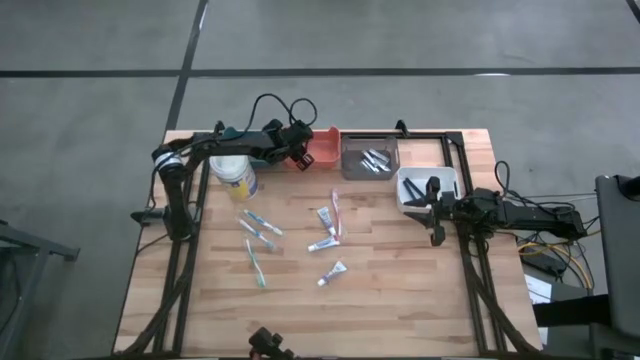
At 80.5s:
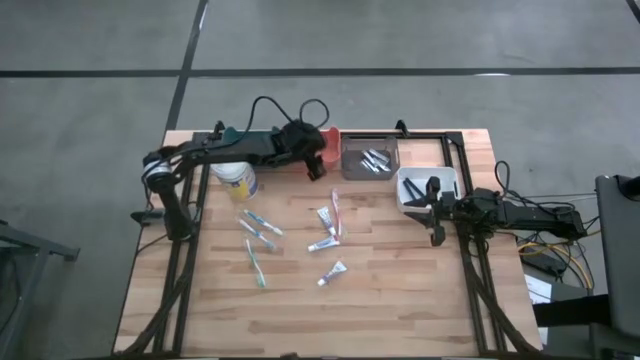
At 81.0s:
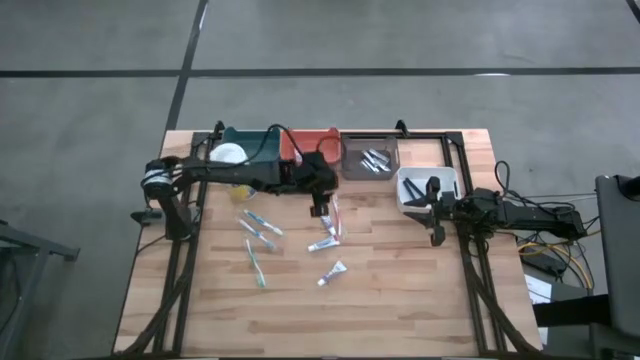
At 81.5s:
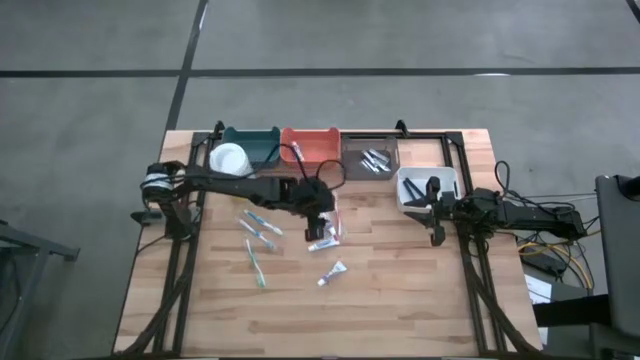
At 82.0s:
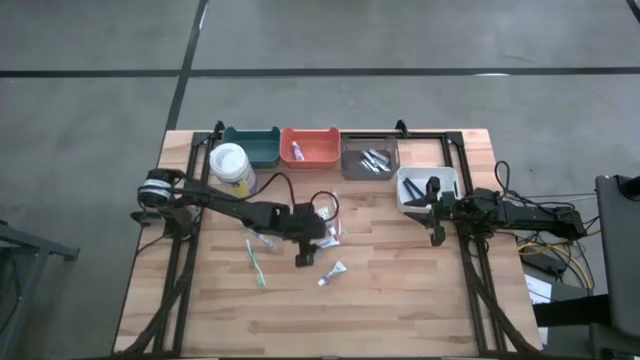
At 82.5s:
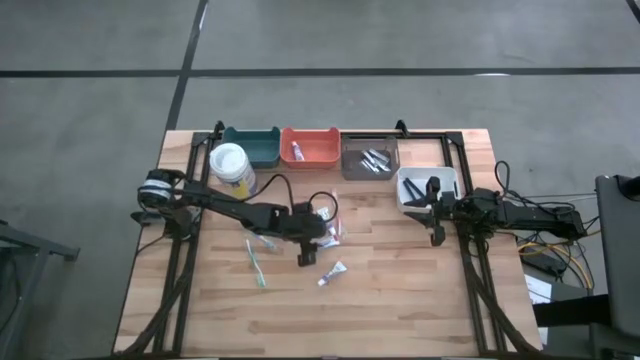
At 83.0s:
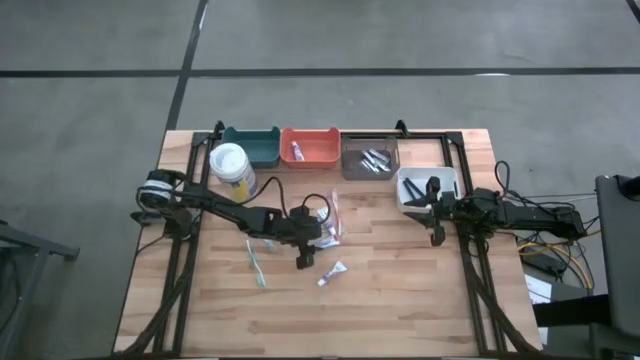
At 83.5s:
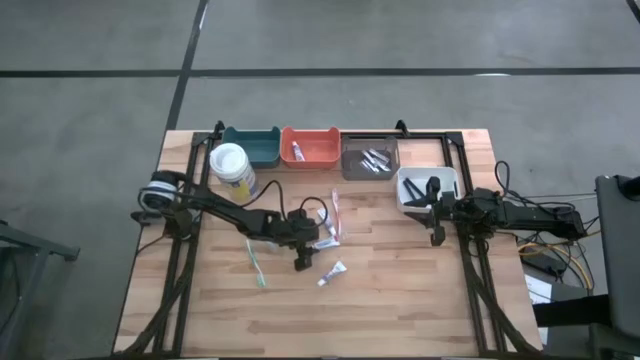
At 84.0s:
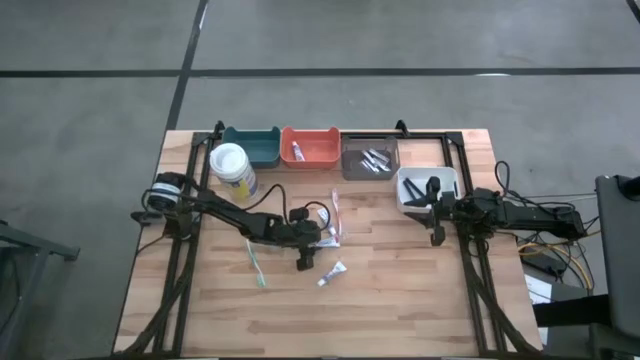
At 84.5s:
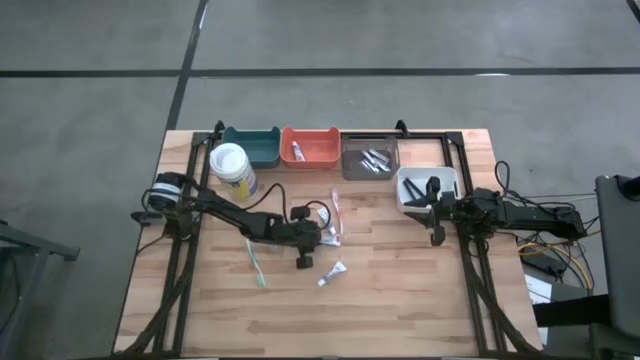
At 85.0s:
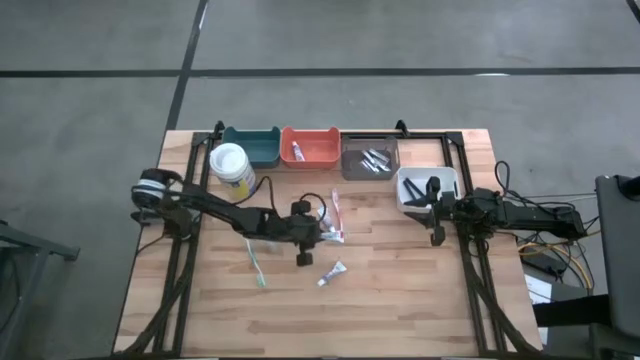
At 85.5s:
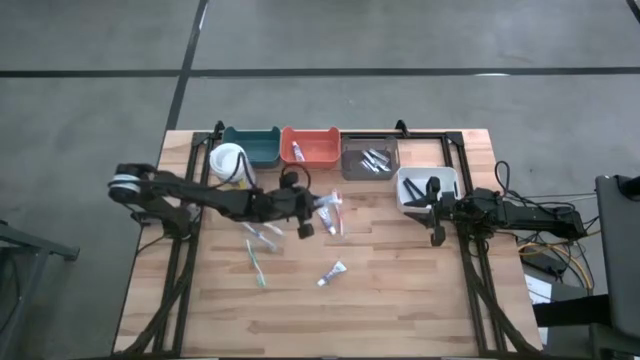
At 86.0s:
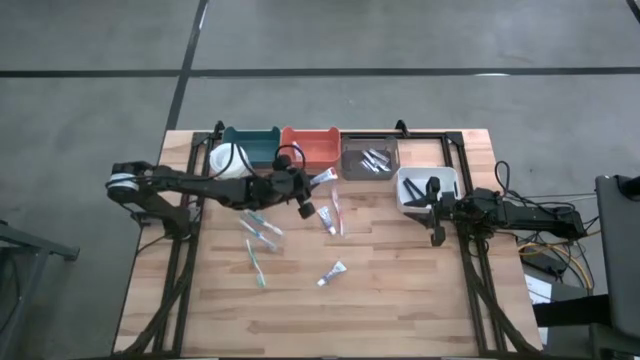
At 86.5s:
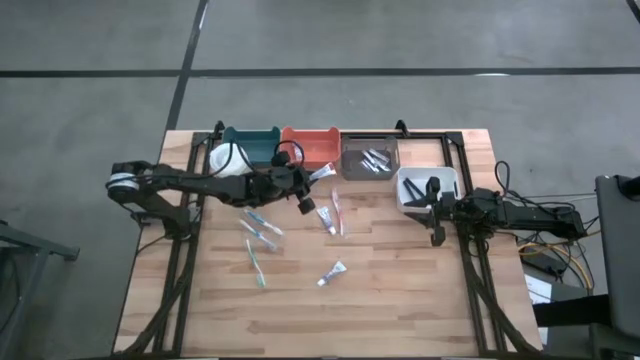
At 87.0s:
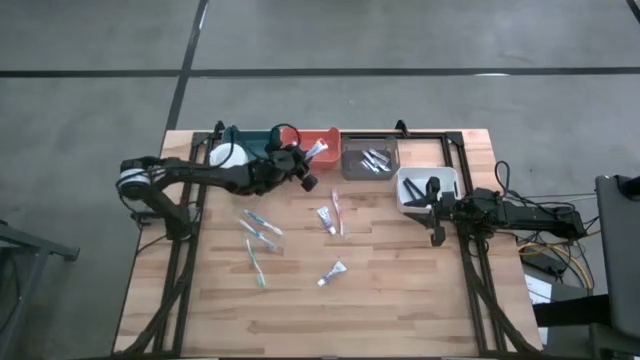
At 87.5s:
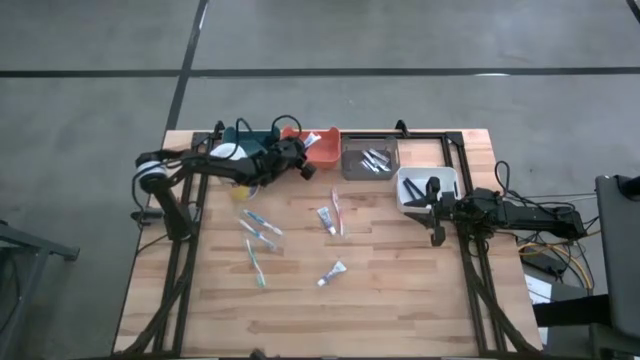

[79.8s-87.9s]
Task: Pick & Place Travel size toiletries
Put the middle toothpaste into the orange bin

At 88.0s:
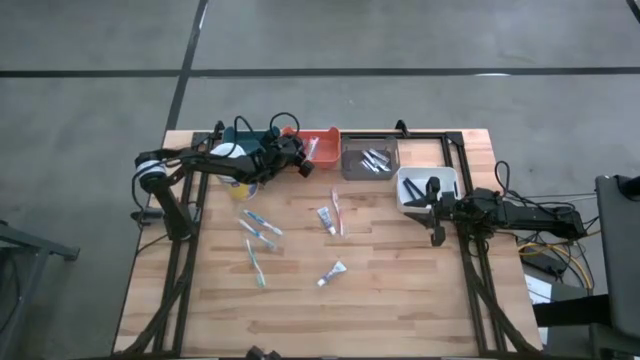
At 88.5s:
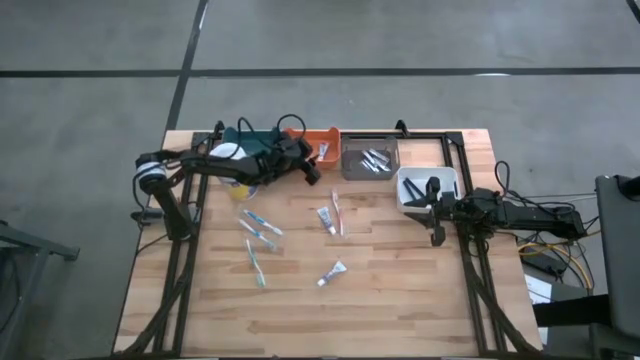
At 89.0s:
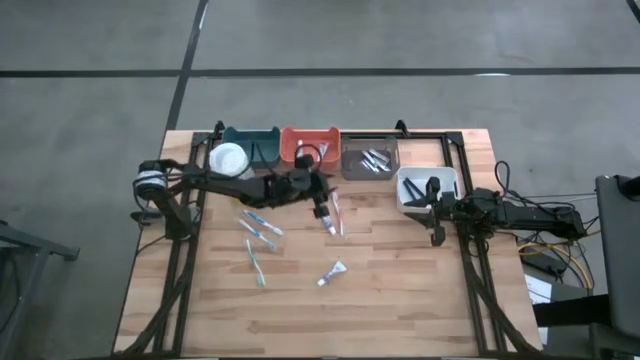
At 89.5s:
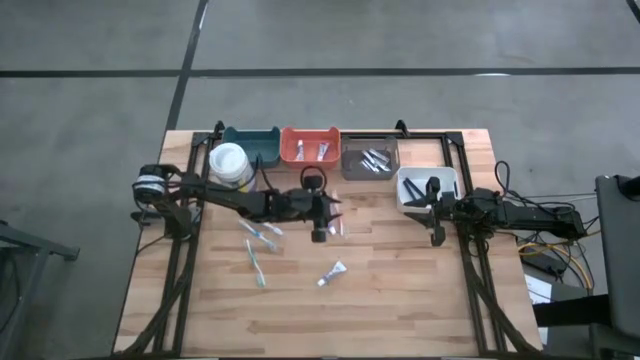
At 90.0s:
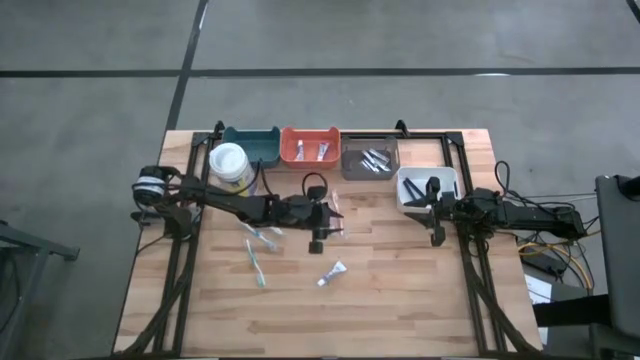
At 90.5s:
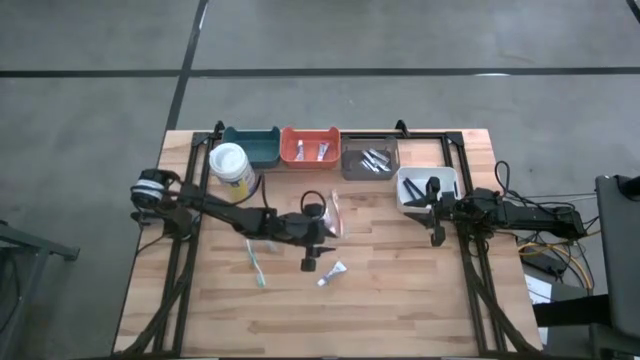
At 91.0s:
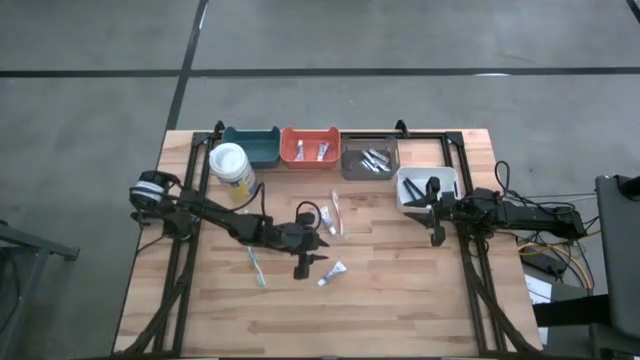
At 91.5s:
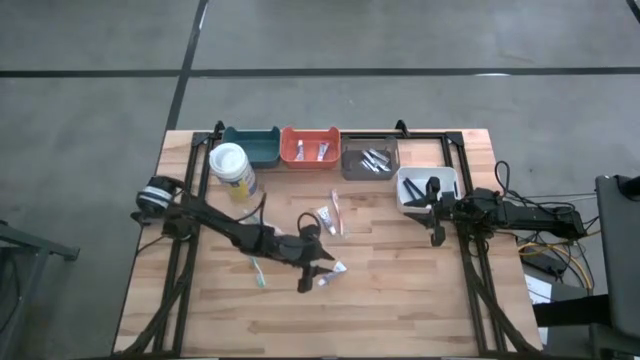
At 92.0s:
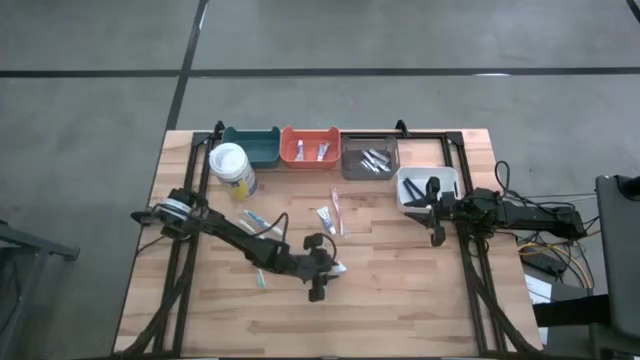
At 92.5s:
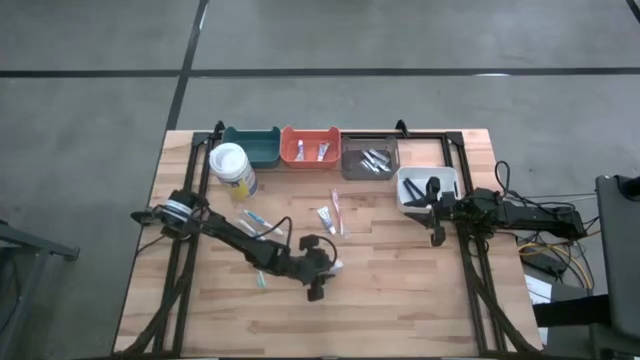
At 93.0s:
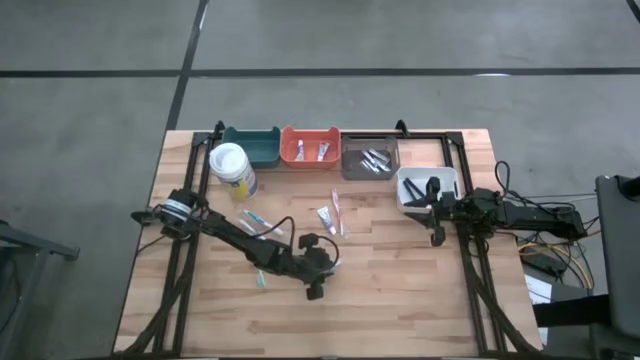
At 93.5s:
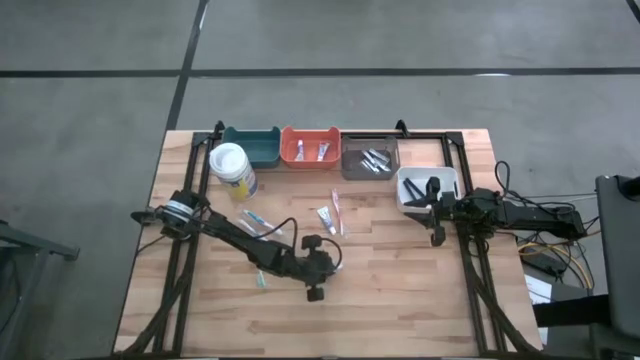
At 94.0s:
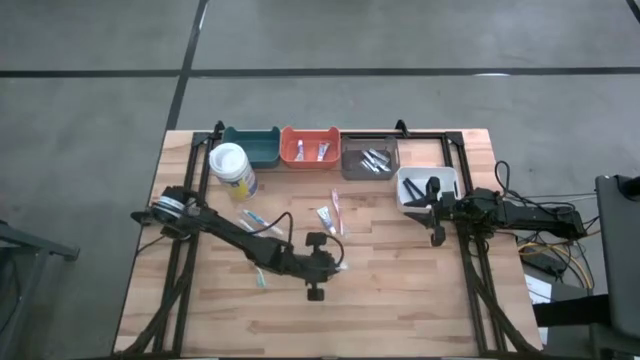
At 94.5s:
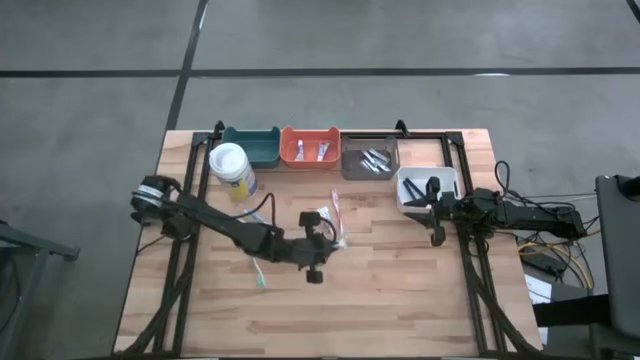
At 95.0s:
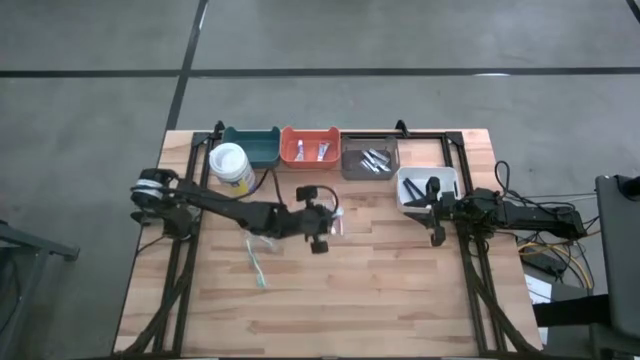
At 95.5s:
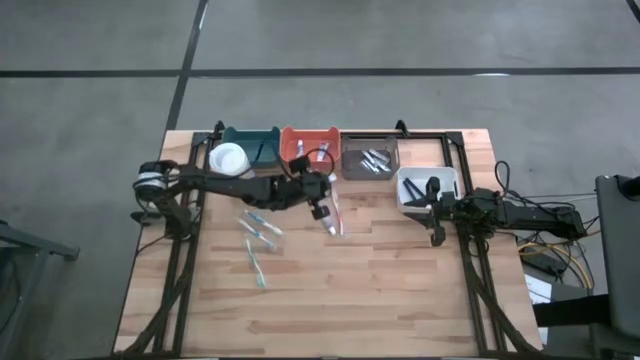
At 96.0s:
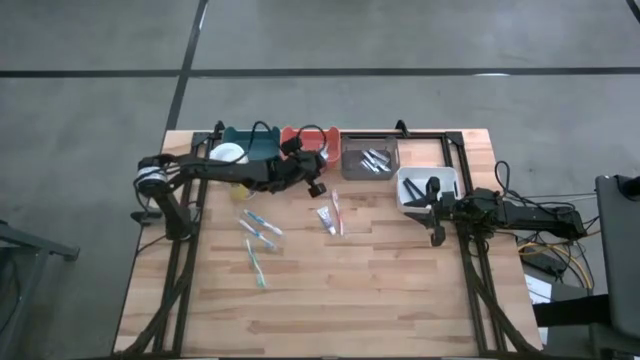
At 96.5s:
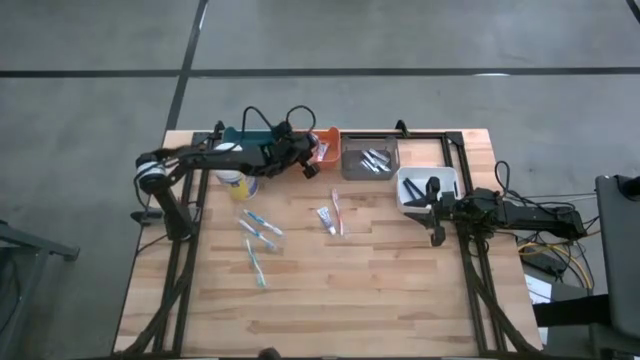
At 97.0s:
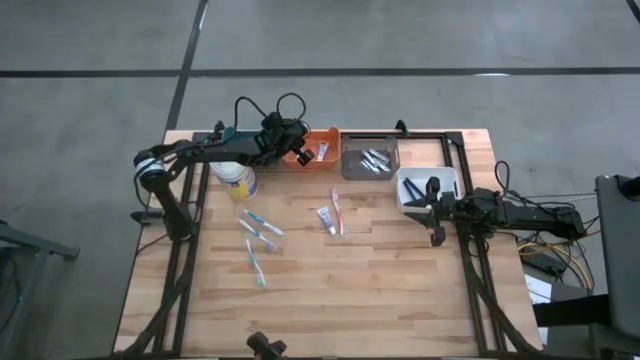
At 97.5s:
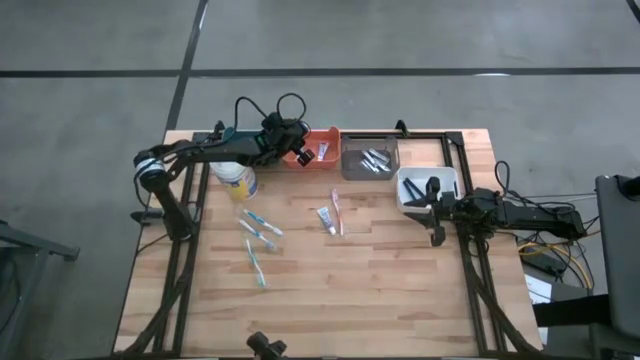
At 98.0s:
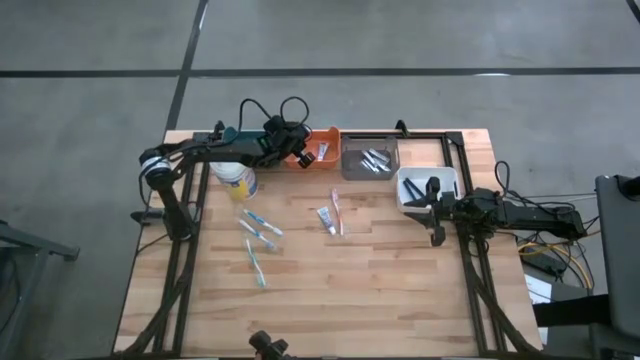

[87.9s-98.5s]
Put the bottom toothpaste into the orange bin

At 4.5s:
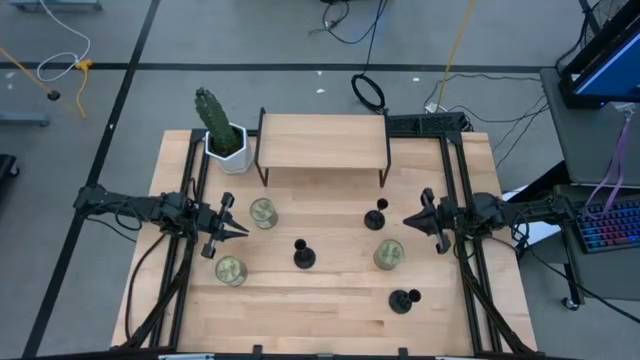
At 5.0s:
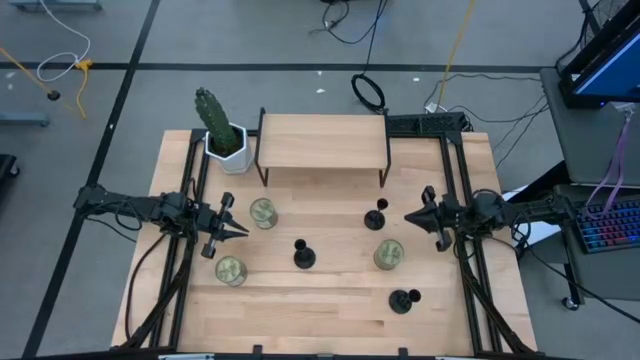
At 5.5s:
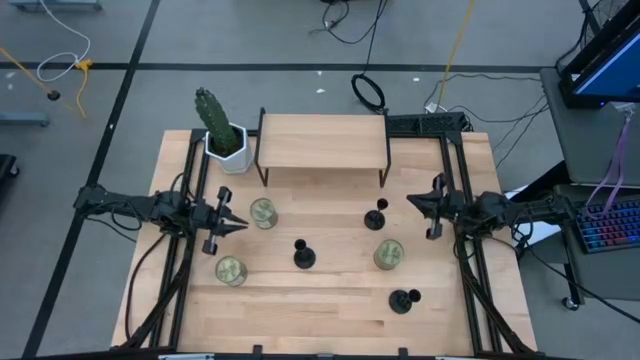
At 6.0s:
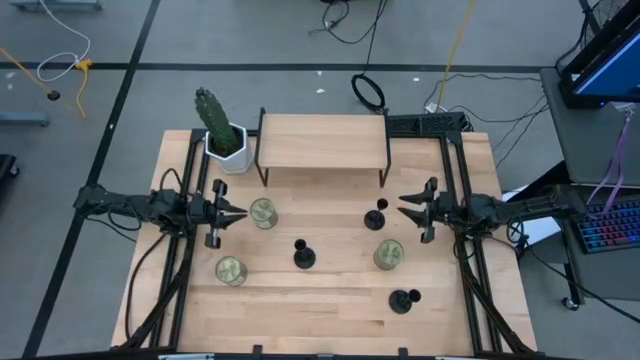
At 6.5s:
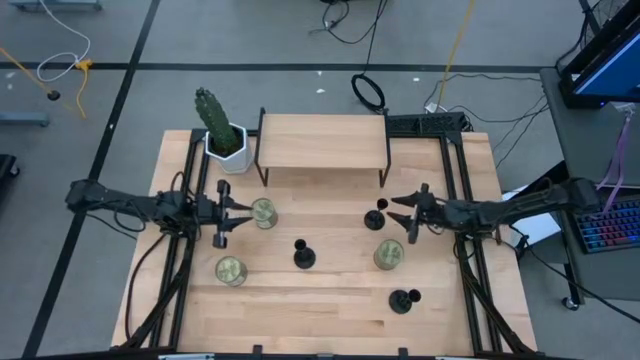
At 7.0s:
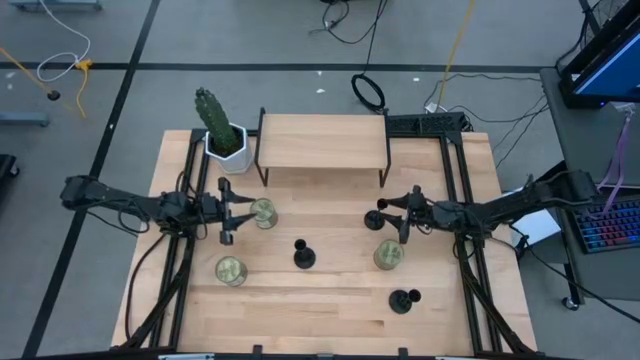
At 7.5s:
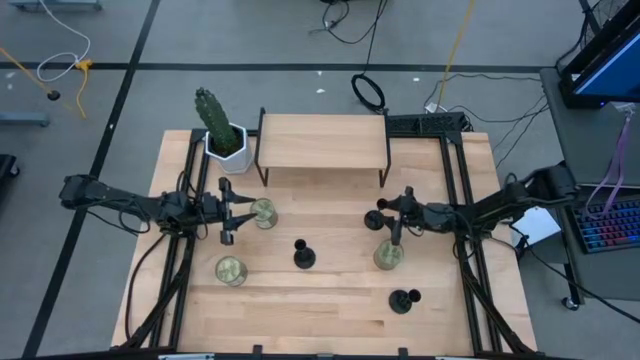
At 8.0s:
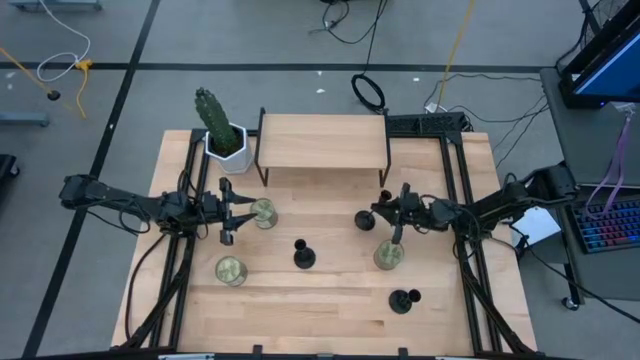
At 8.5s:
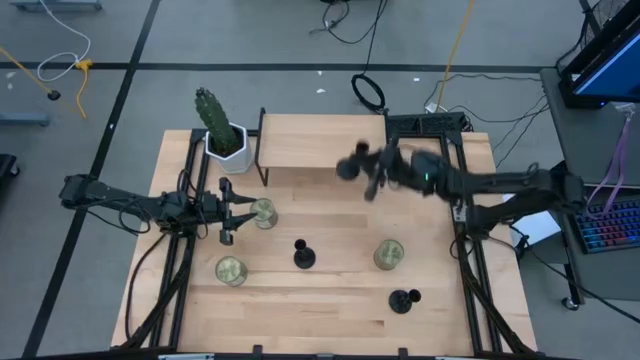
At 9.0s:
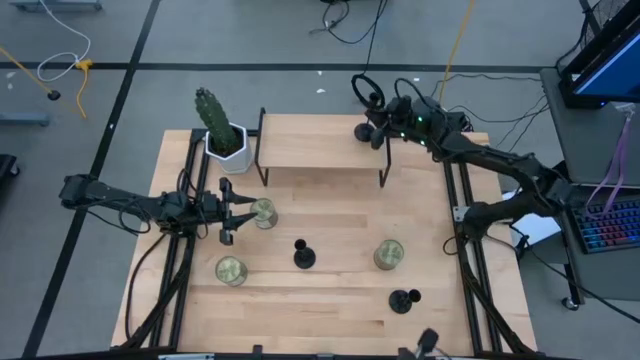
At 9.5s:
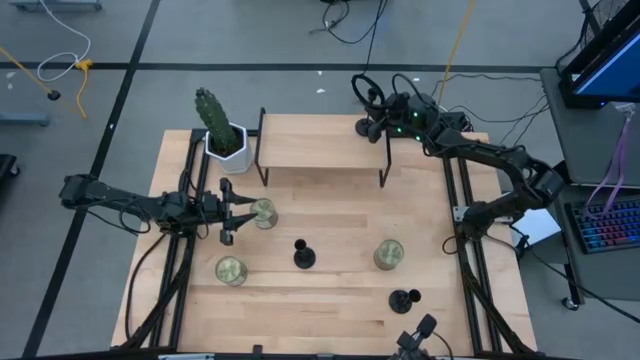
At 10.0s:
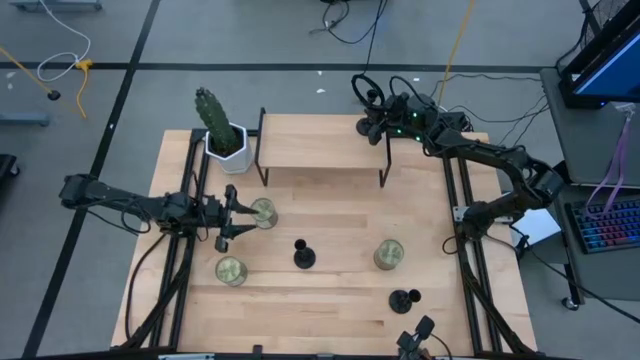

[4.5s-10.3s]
Task: Pick & Place candle stick holders
Put the top black candle holder on the shelf
